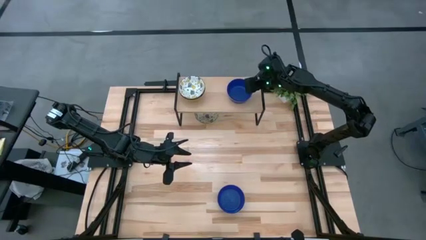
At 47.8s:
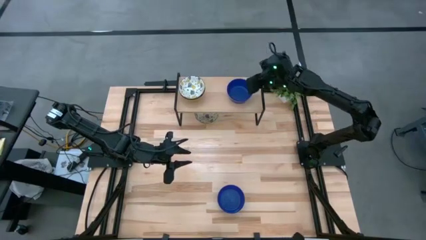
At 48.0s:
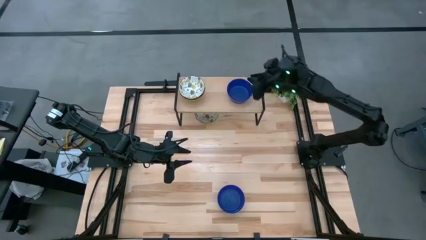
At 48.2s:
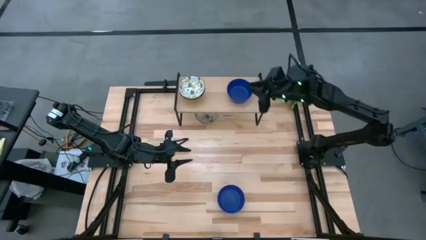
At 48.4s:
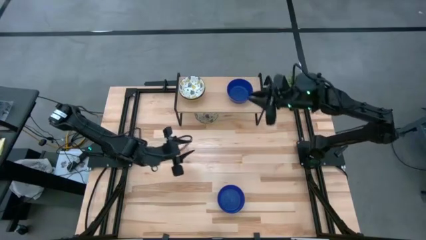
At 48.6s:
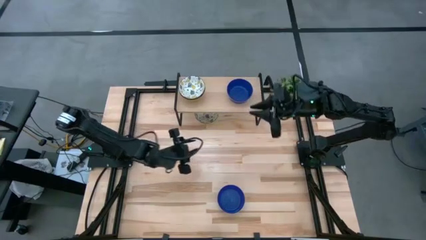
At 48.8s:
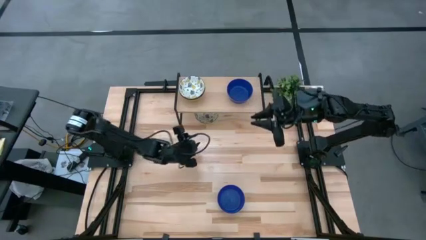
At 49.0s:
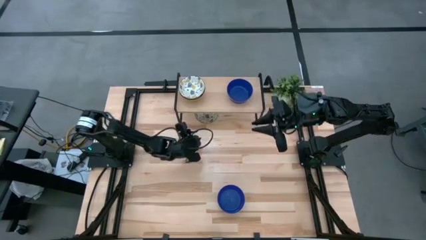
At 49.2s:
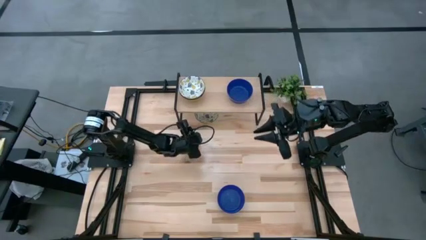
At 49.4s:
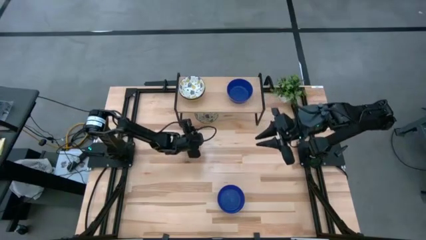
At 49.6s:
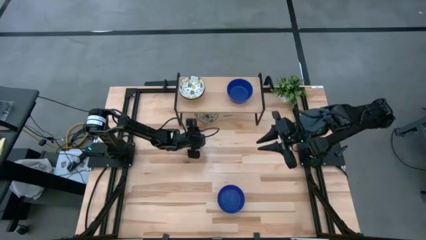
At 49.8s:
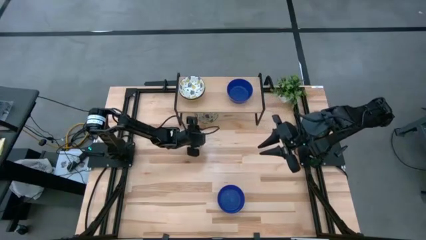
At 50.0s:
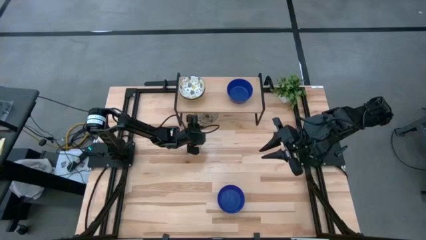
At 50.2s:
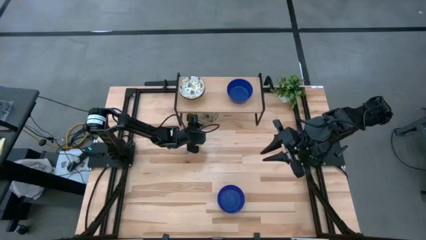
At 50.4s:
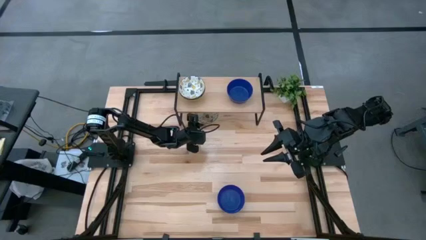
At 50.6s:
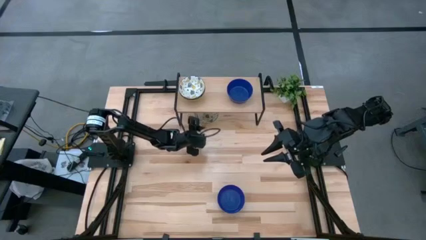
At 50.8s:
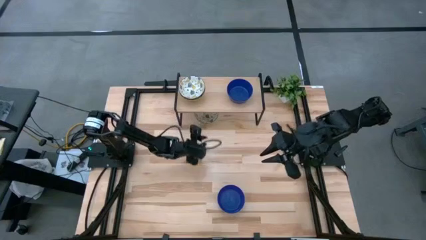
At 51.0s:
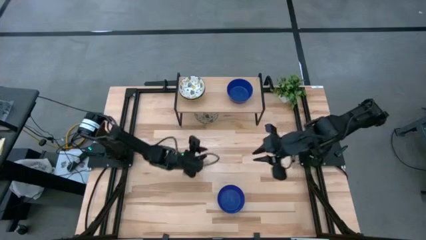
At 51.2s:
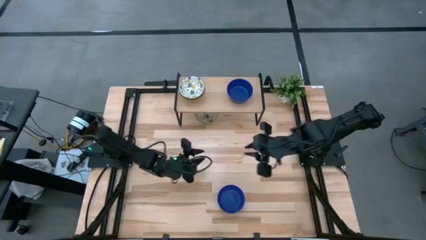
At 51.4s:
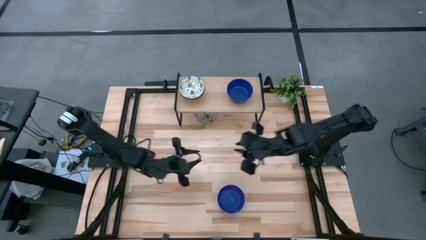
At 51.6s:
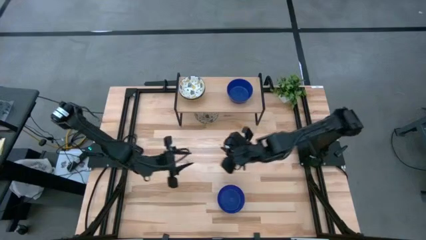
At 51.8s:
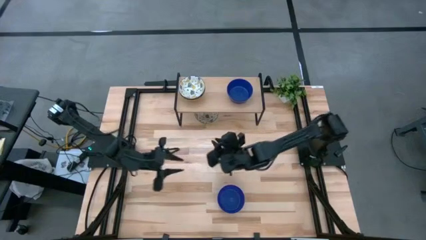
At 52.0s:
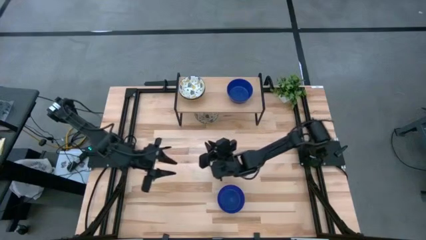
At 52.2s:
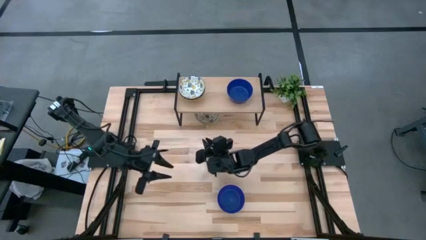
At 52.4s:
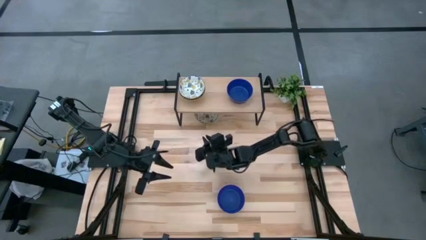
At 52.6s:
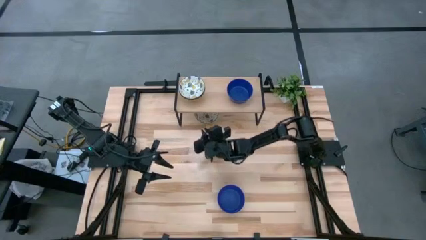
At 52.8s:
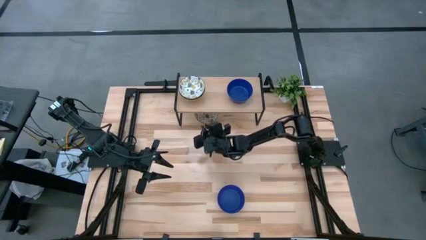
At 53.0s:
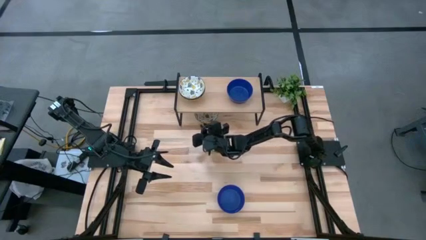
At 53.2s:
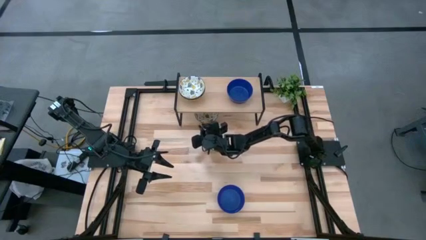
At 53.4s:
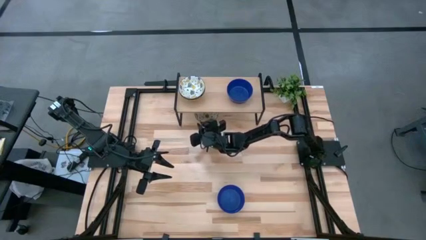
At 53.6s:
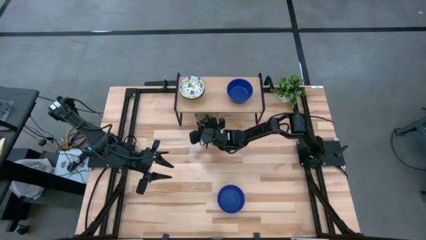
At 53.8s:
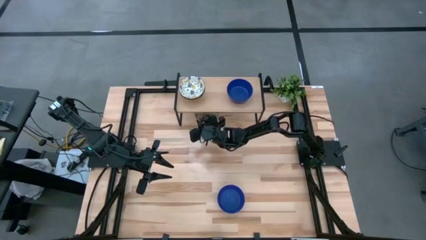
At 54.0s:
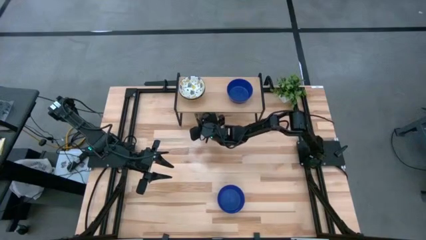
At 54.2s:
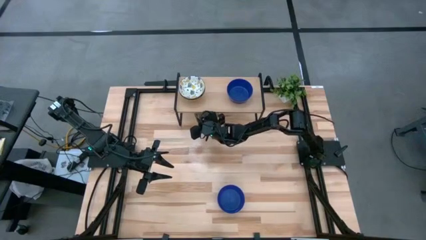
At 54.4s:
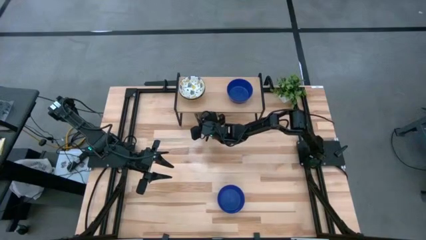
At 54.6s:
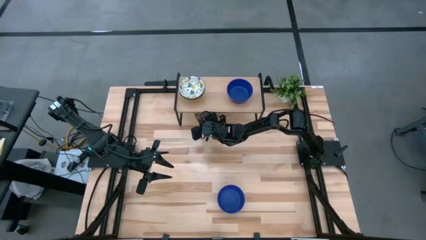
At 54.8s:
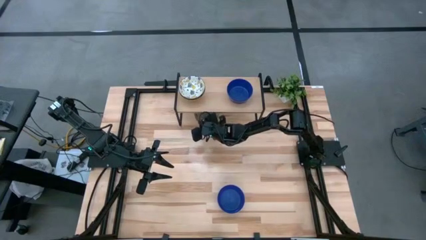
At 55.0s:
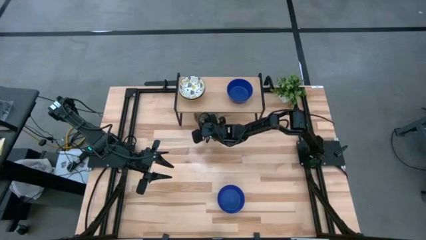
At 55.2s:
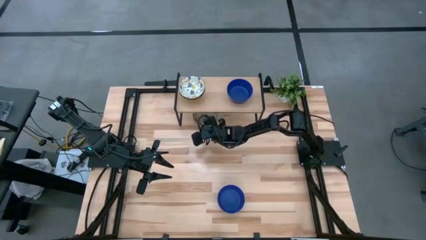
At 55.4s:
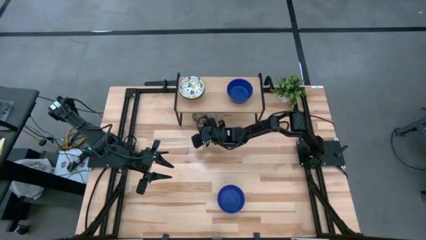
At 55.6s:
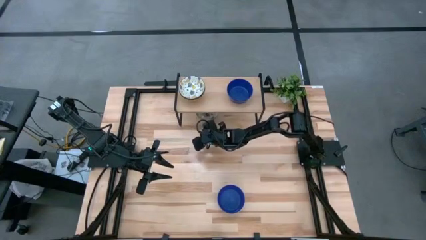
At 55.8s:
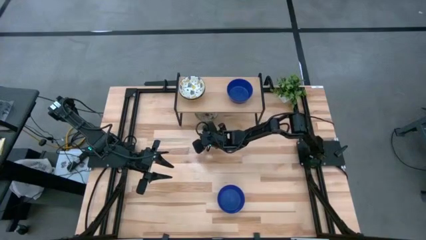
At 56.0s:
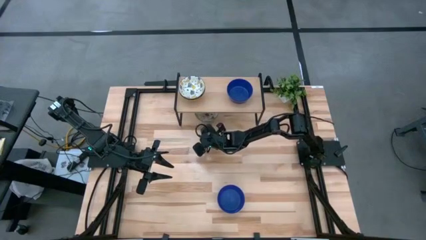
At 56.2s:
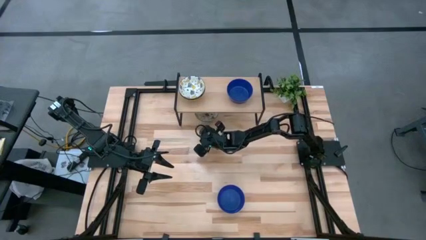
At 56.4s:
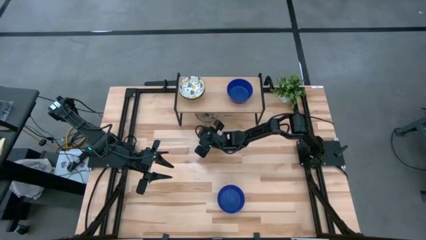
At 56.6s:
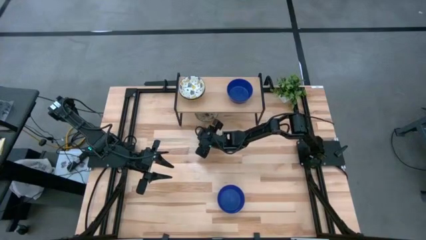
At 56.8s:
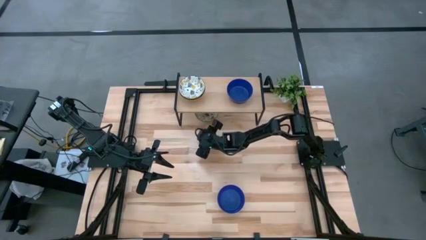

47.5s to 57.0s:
Task: Pick & Place Mini bowls
Stack the white bowl on top of the white bowl on the shelf

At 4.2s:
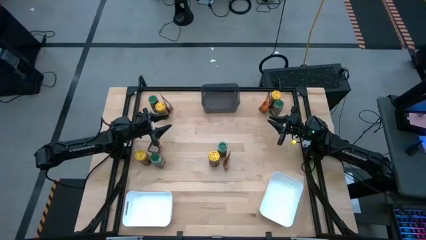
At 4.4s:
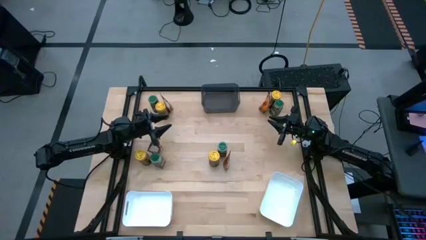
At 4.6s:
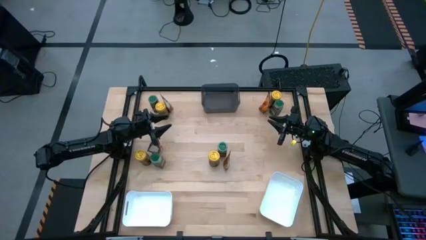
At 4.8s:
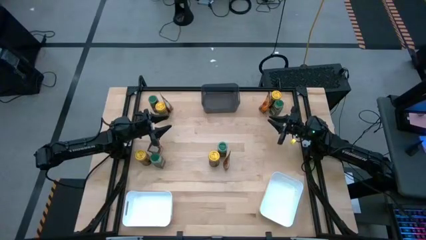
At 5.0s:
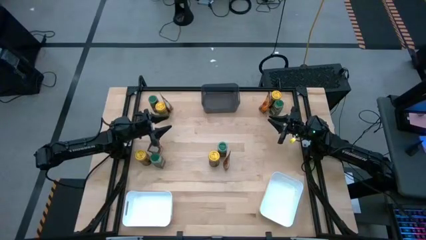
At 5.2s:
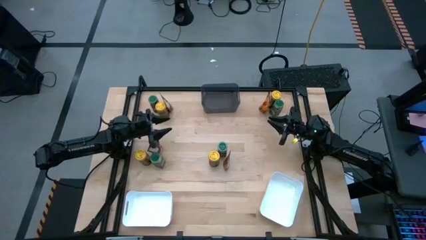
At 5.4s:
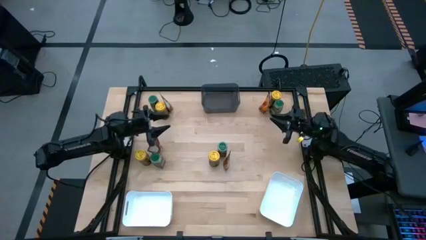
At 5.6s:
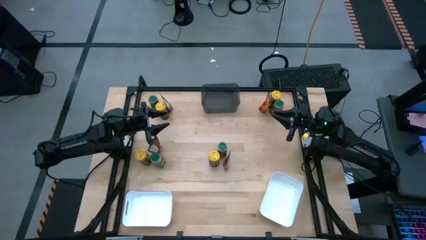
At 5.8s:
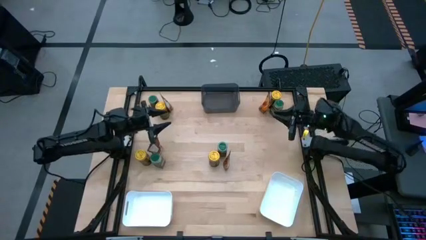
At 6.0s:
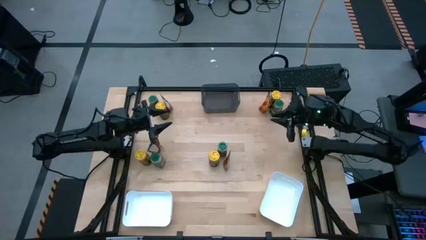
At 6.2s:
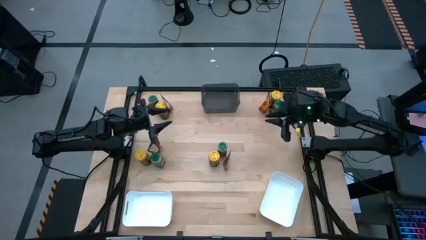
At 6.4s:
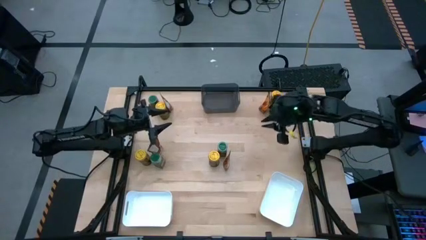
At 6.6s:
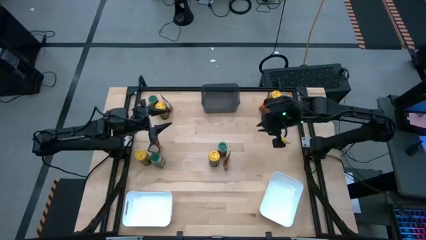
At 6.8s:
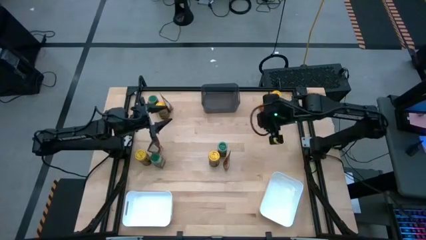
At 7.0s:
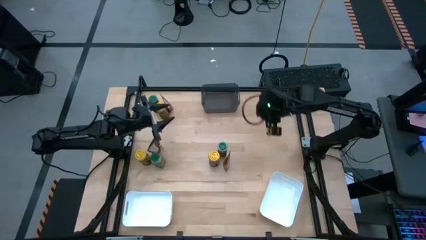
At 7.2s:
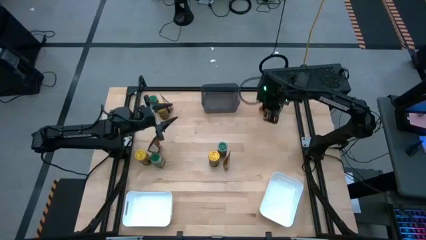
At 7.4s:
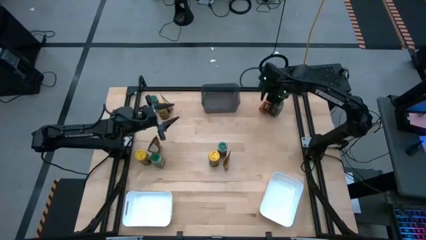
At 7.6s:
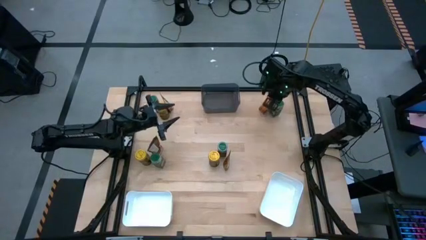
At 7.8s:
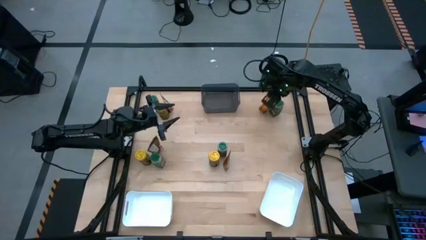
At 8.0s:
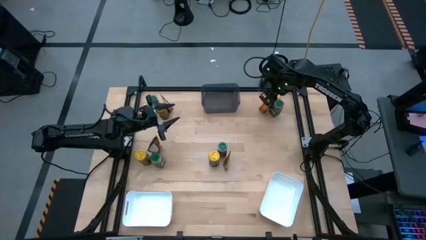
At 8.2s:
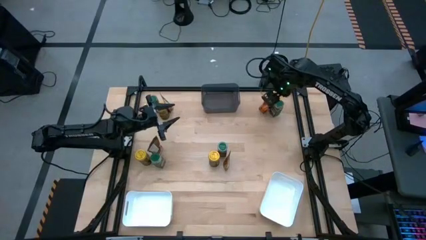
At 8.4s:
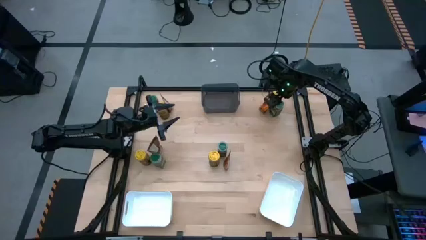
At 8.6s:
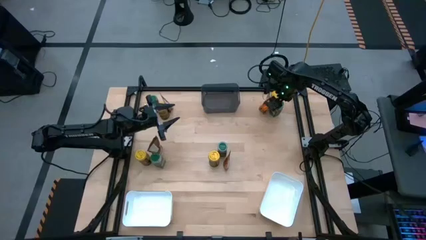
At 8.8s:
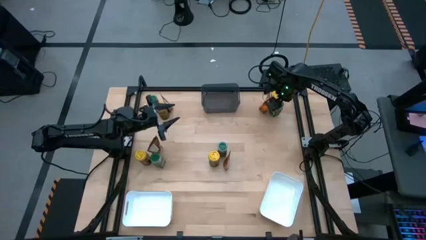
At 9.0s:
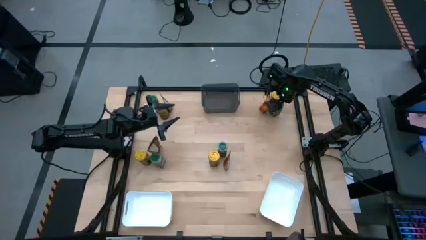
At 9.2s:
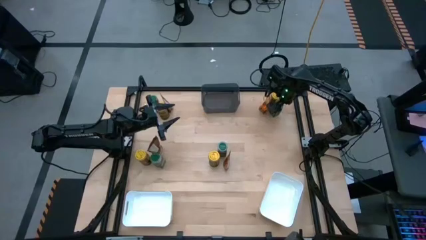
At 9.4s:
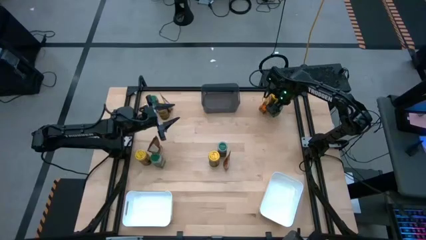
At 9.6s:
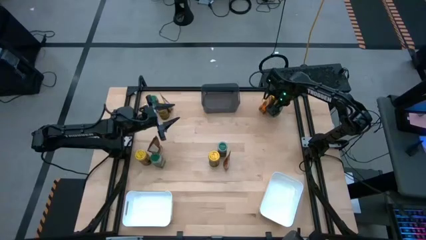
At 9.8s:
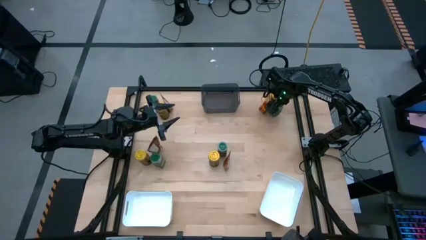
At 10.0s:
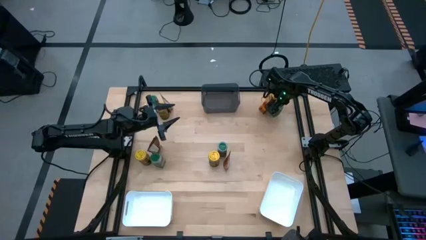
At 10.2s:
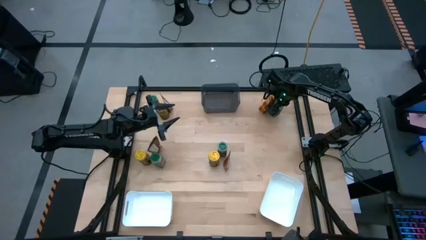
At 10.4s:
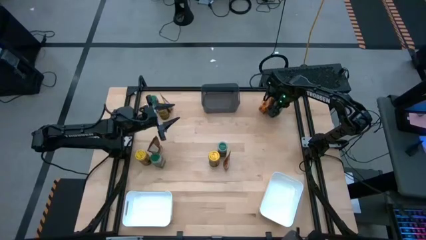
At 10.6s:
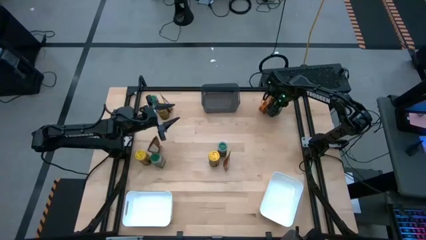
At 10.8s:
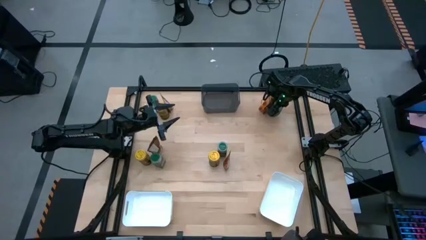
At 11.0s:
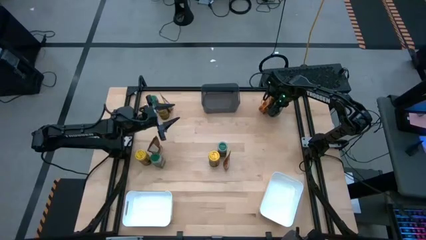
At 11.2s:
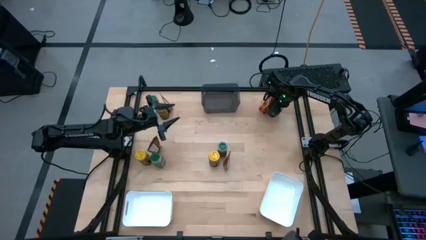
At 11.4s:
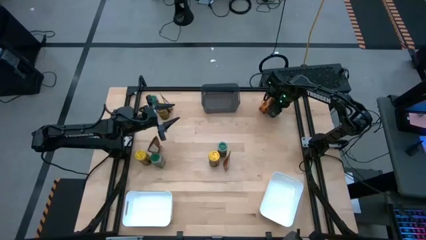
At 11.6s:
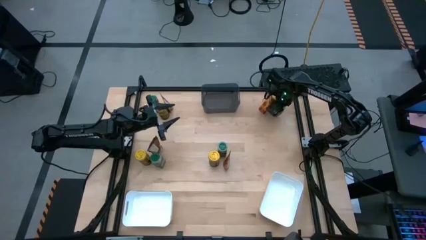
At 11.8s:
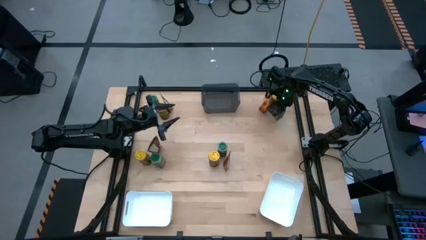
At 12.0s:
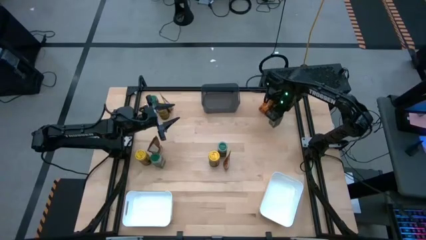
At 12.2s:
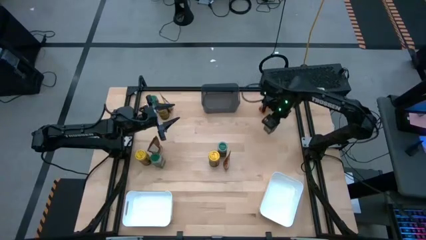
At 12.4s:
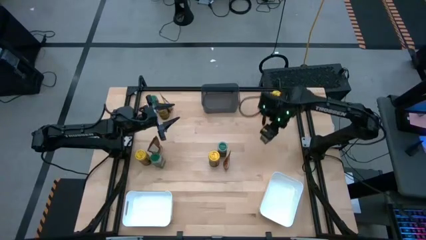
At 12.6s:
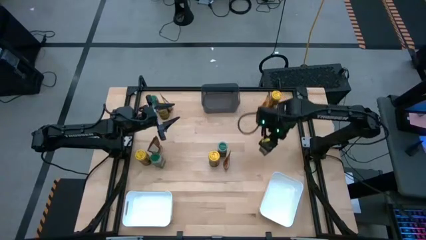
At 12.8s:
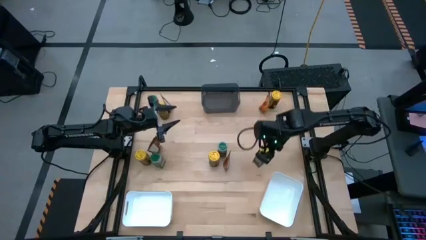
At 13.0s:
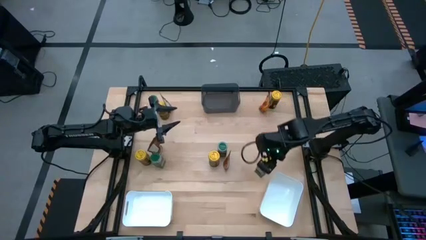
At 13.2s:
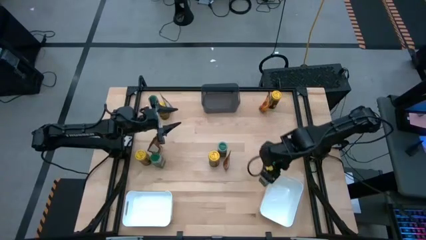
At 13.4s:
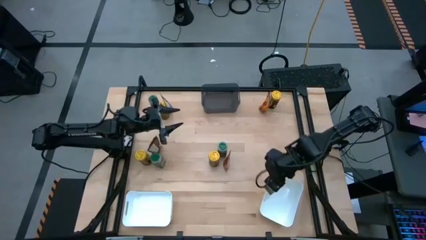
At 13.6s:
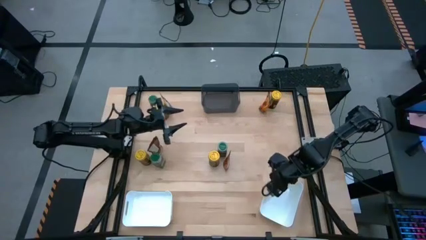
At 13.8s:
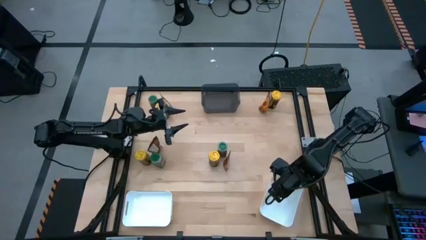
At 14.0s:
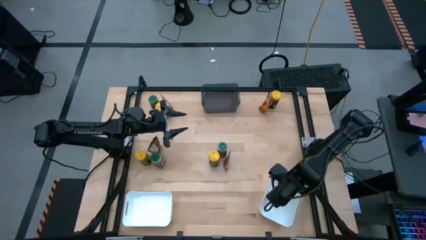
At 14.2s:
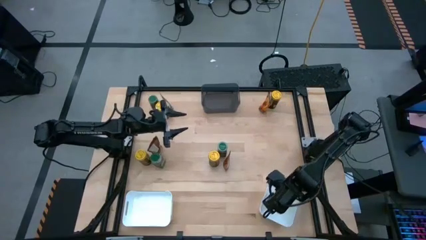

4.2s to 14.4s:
Task: Sort spices by type
Put the top right green seasoning bottle into the right white bin
